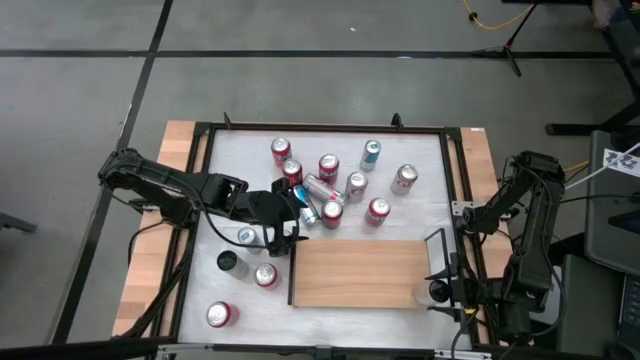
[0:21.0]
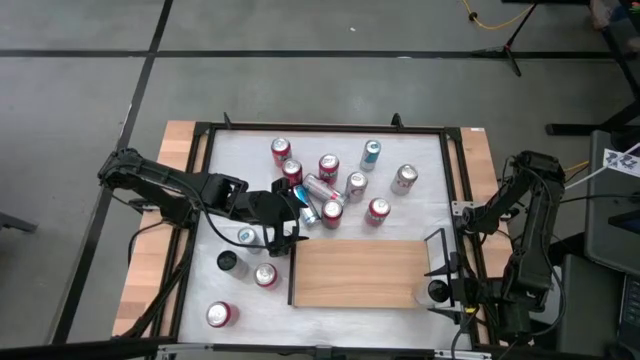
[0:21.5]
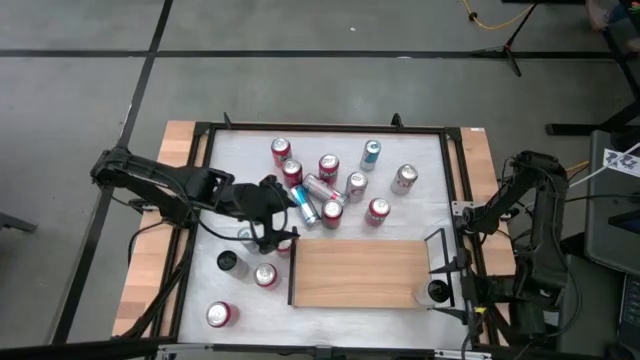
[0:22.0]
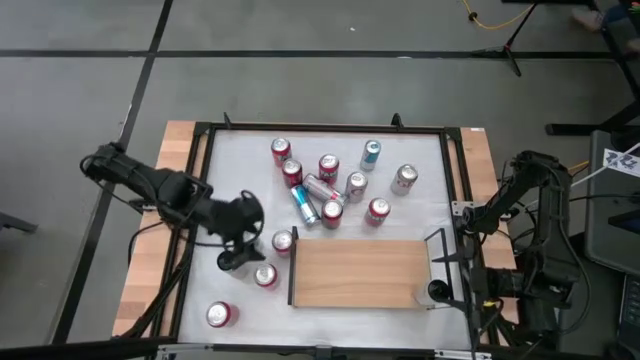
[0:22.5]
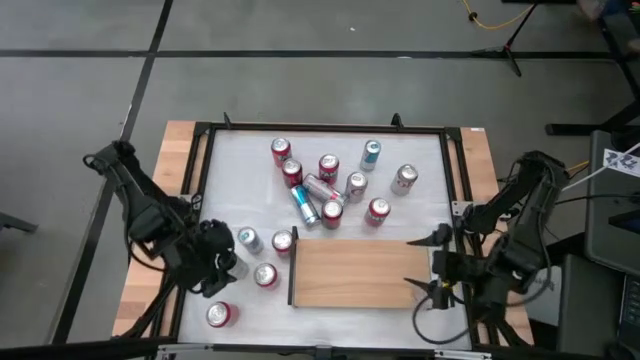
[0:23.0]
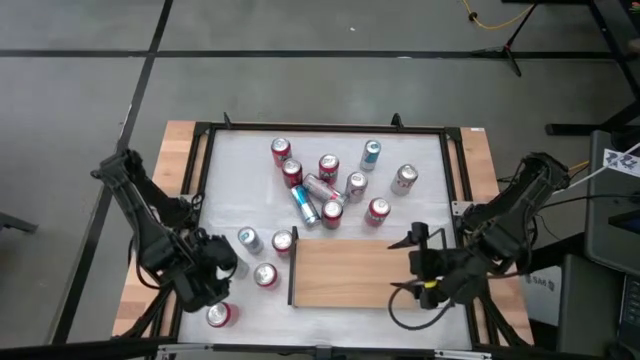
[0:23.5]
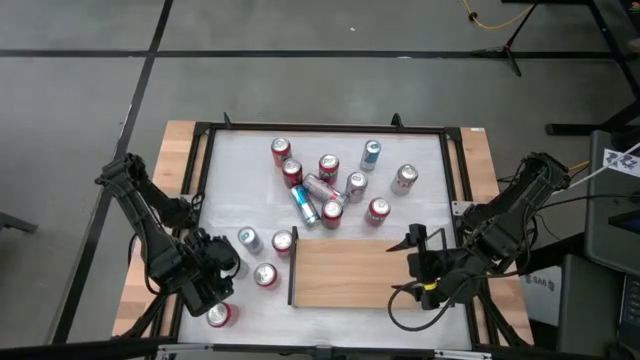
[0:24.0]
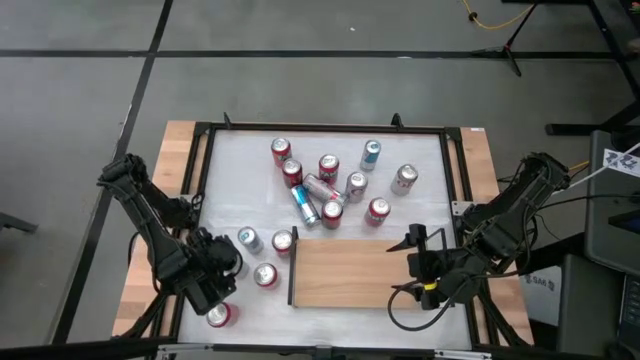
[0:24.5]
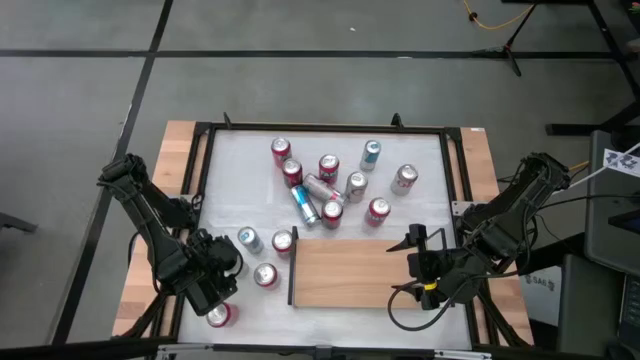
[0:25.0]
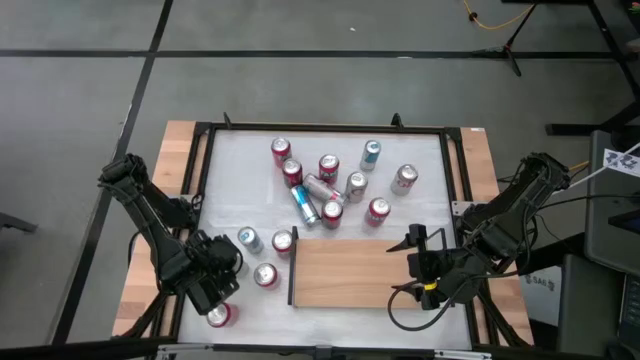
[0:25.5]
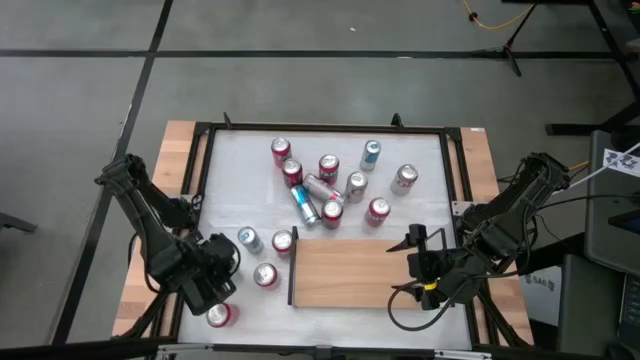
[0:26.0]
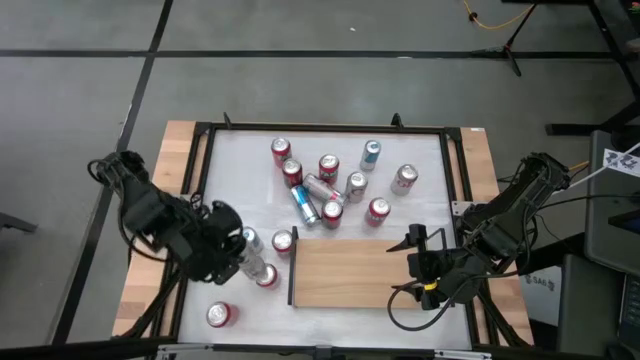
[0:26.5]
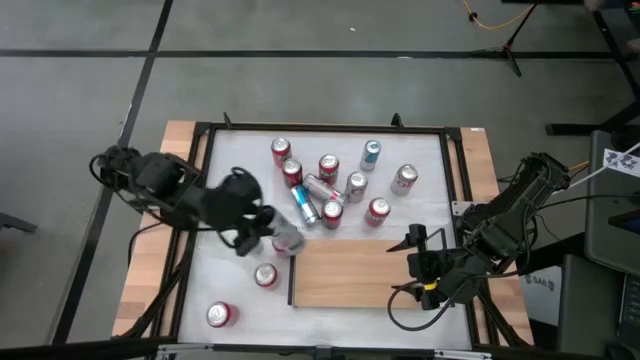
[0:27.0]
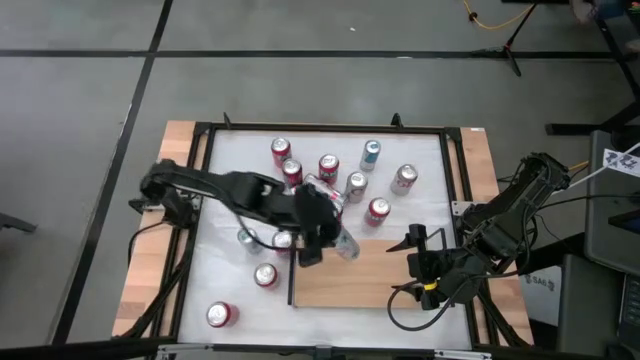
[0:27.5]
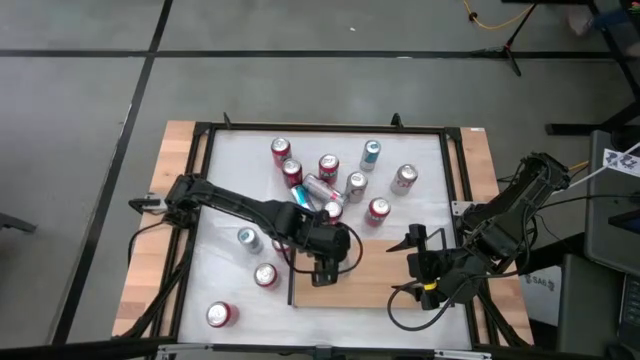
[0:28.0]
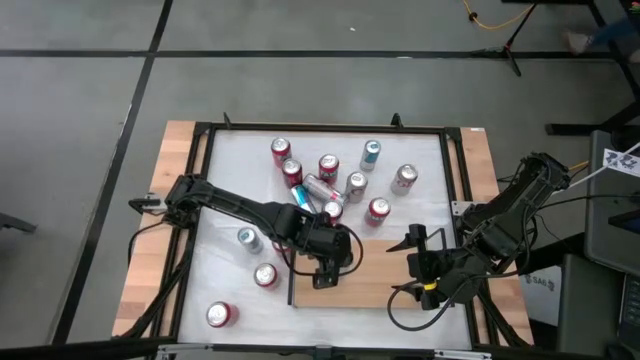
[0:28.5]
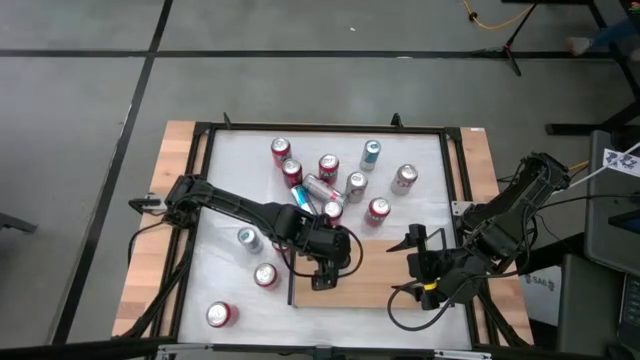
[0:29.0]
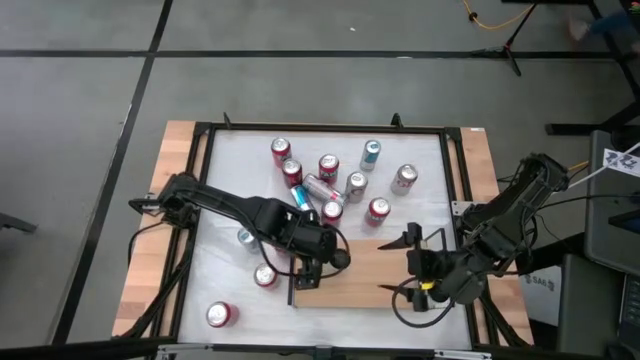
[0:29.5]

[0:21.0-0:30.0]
Task: Place canned beverage on shelf
Put the black soda can on the shelf

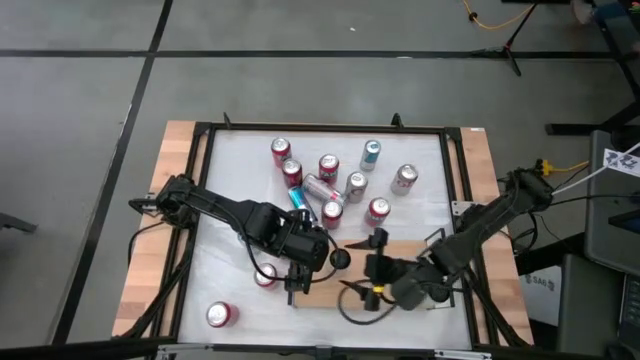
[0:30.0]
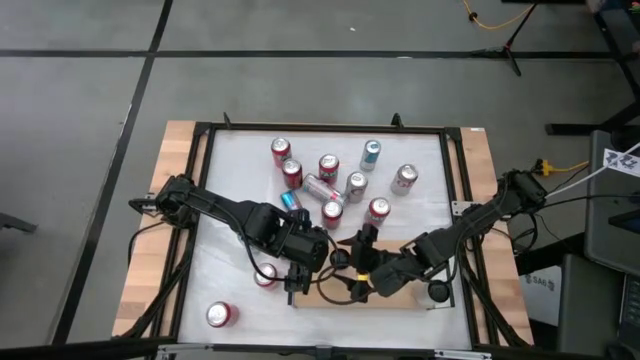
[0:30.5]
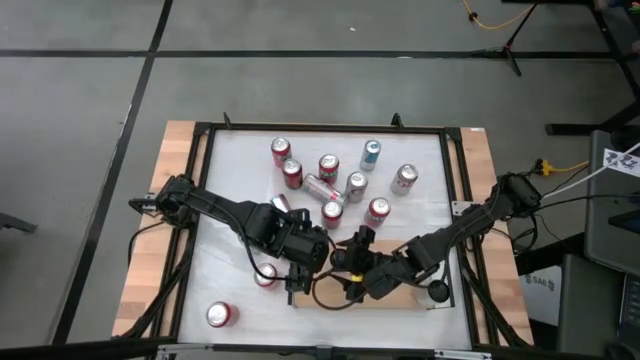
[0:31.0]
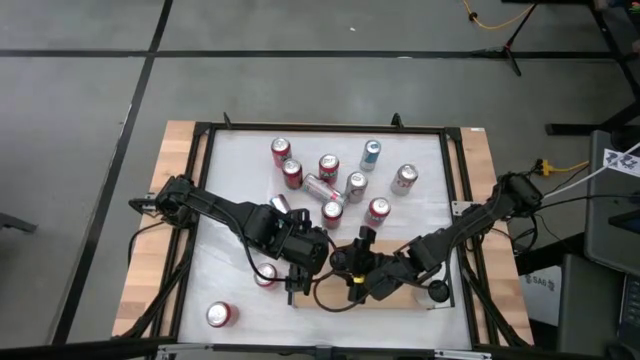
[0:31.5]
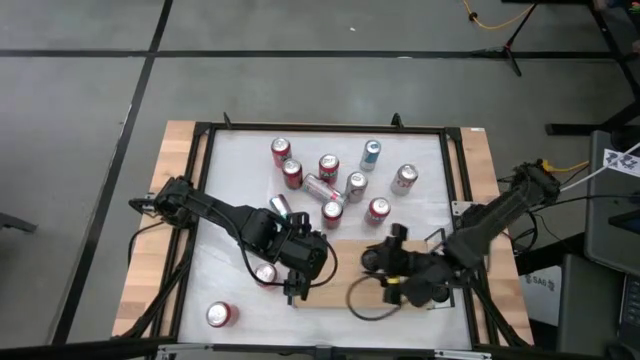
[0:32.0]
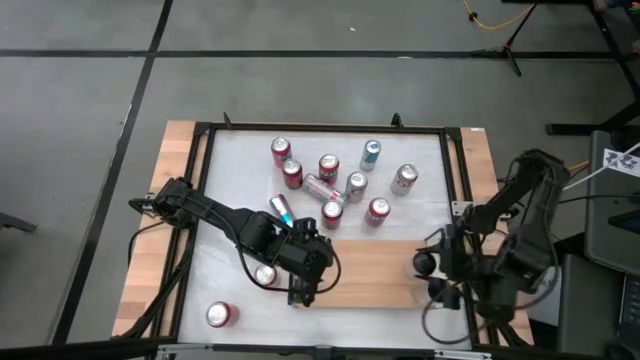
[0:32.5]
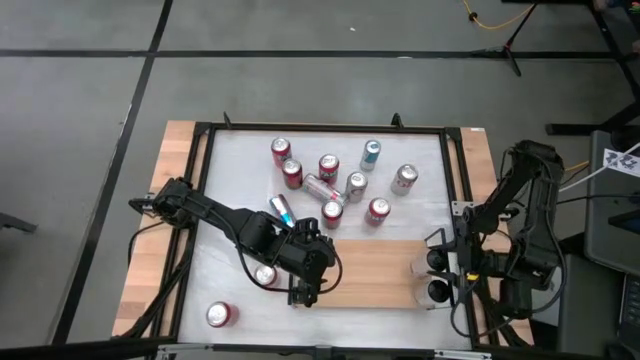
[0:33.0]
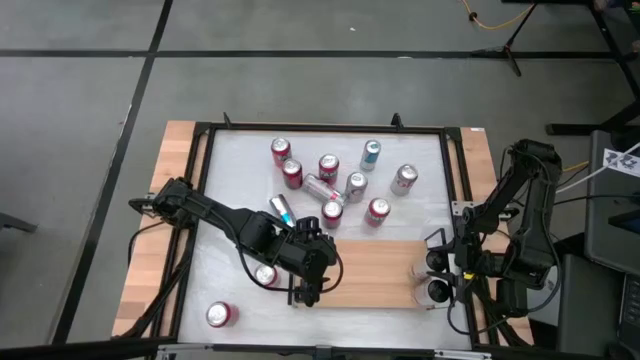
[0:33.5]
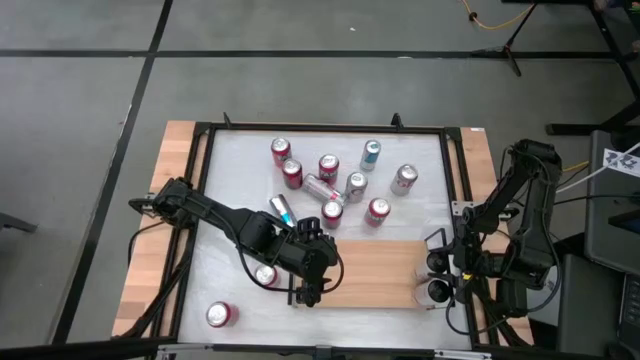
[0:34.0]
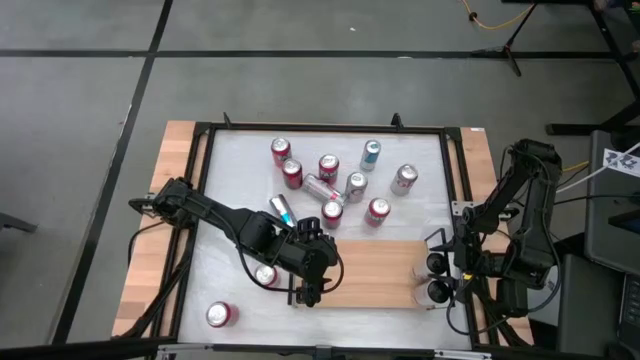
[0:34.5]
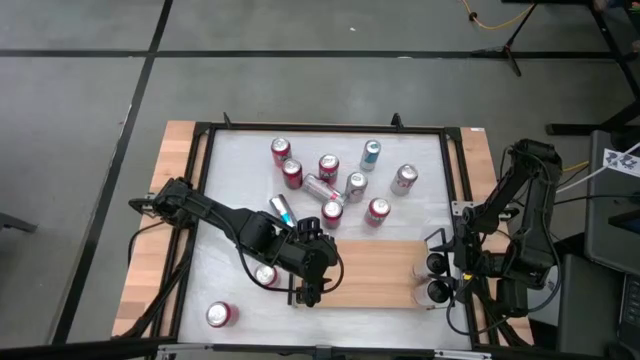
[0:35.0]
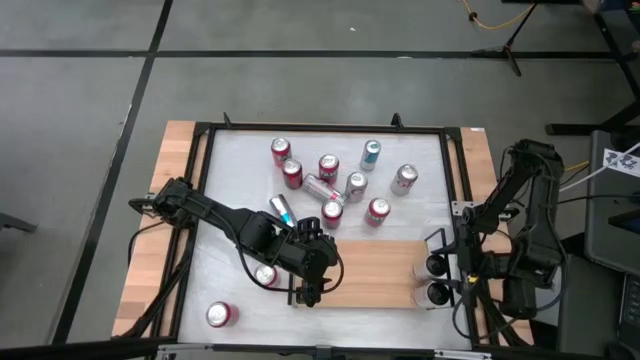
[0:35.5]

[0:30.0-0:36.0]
Move the black soda can on the shelf

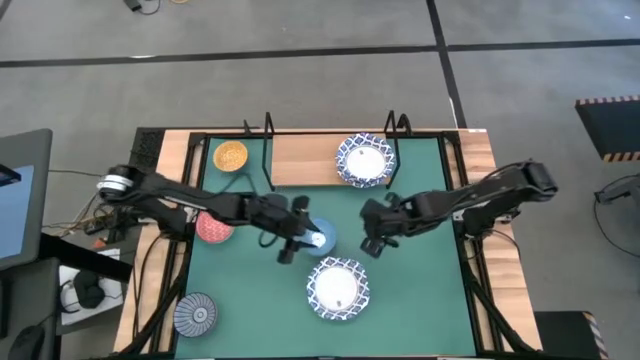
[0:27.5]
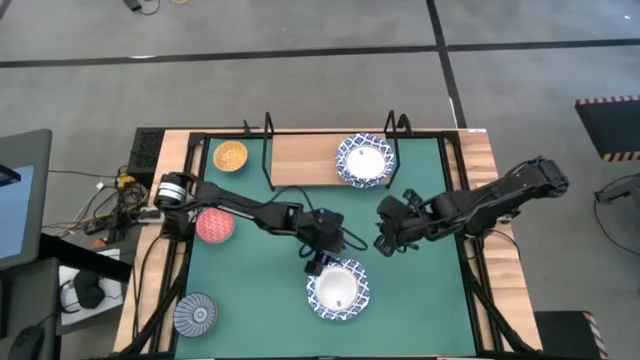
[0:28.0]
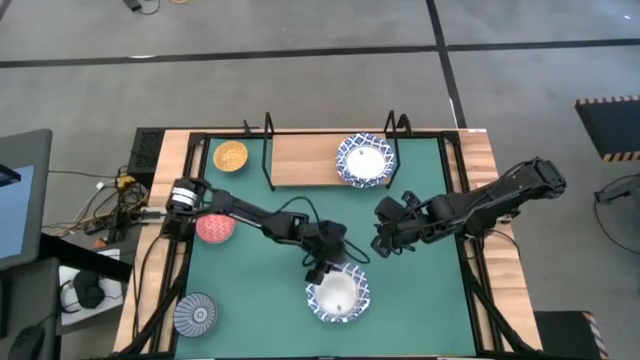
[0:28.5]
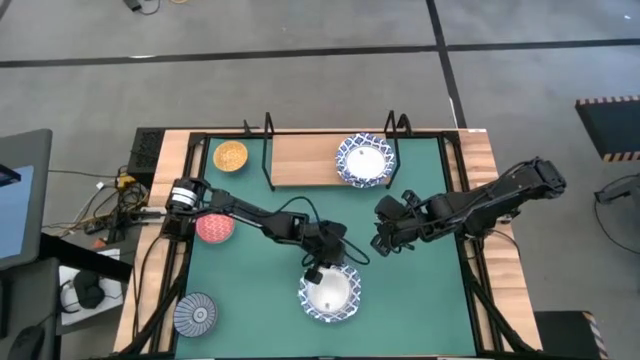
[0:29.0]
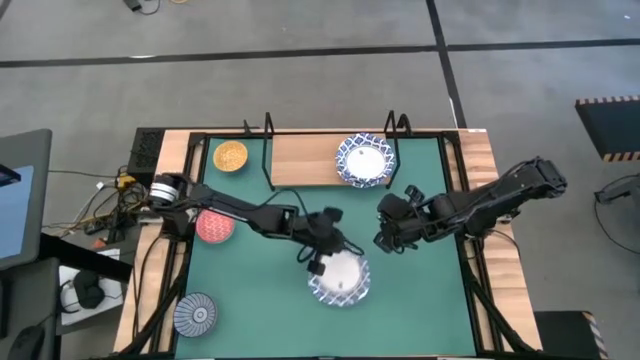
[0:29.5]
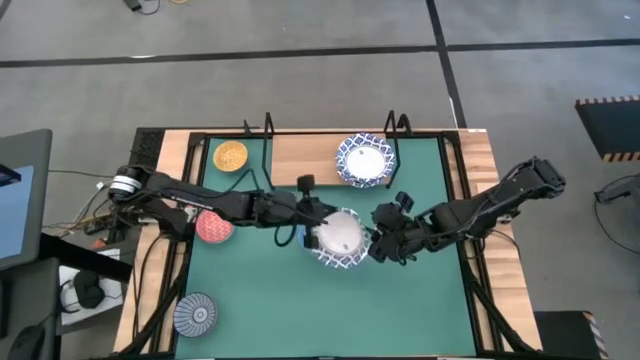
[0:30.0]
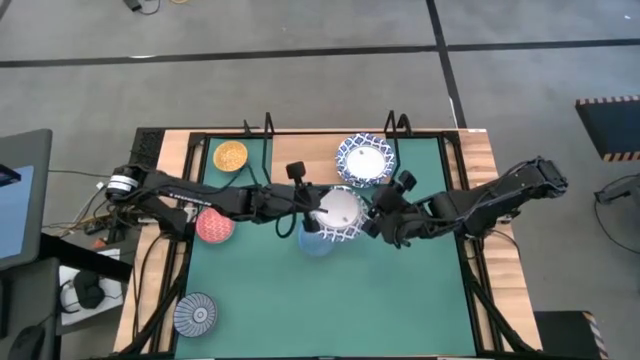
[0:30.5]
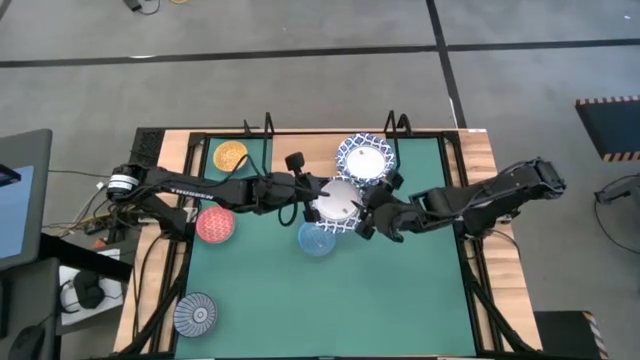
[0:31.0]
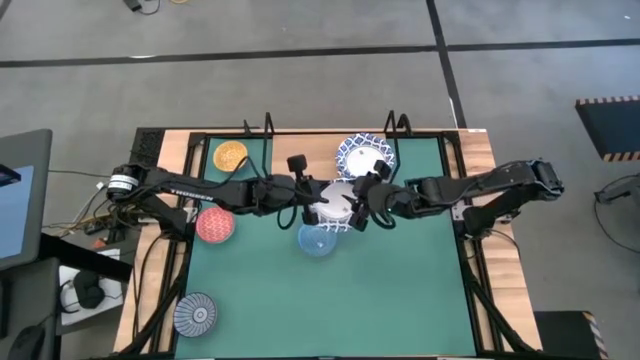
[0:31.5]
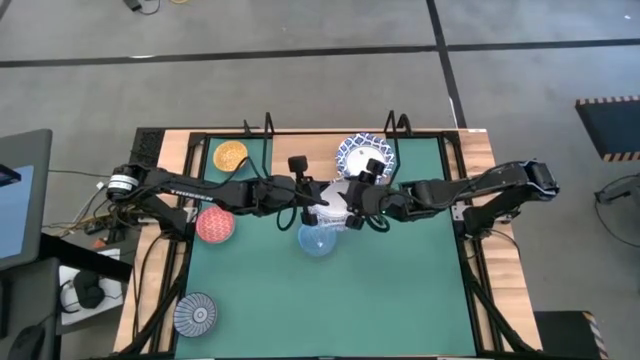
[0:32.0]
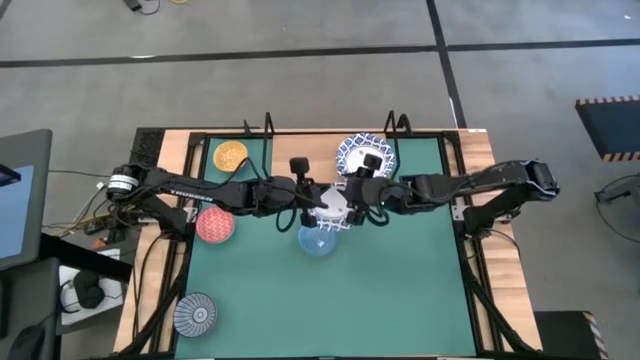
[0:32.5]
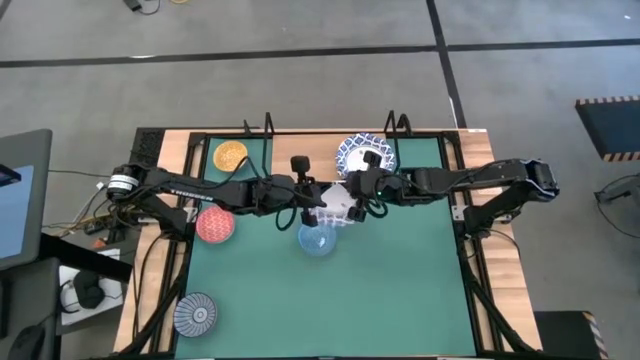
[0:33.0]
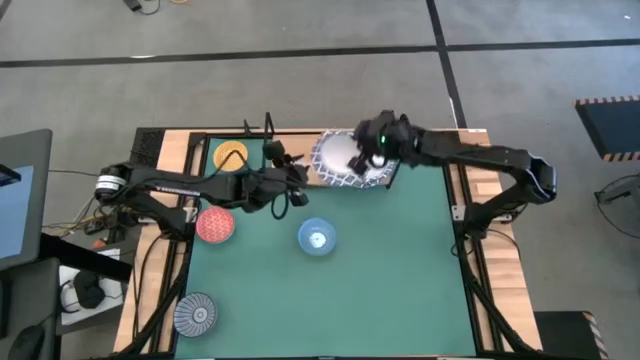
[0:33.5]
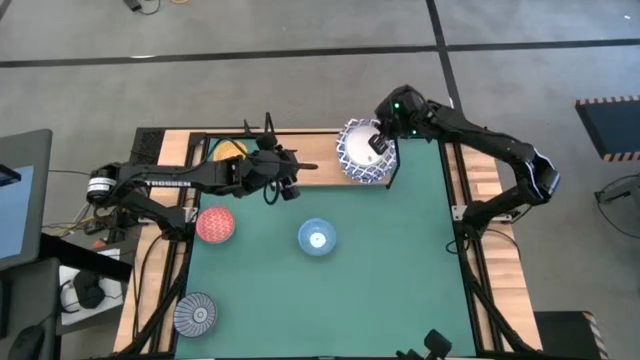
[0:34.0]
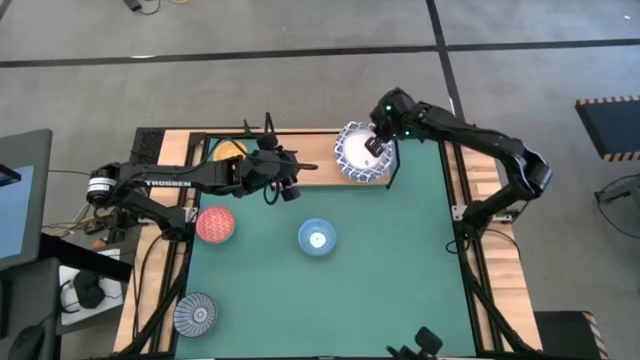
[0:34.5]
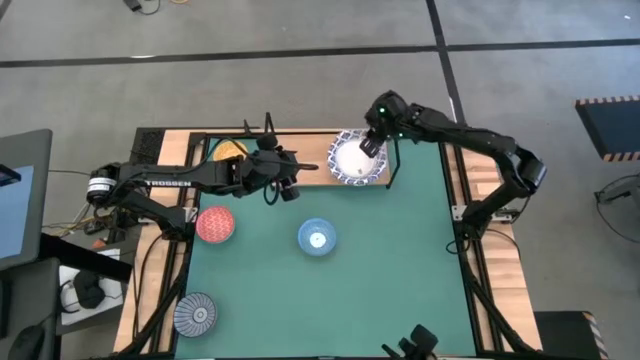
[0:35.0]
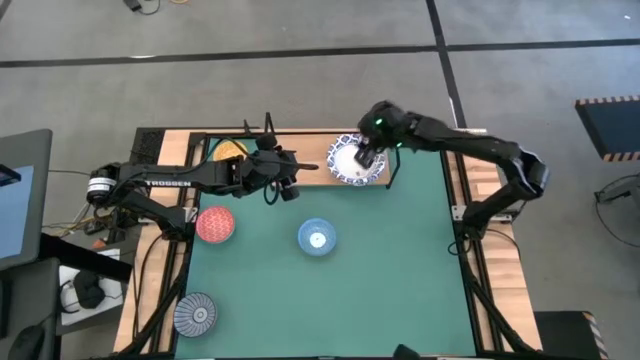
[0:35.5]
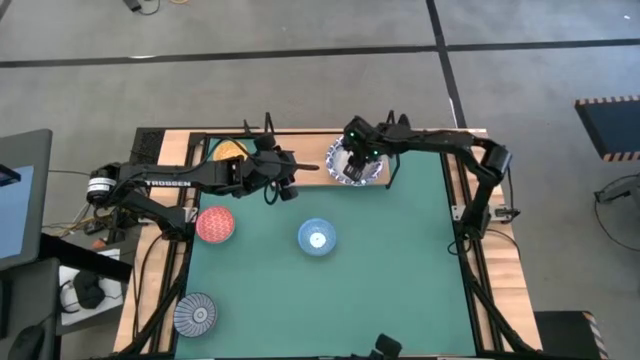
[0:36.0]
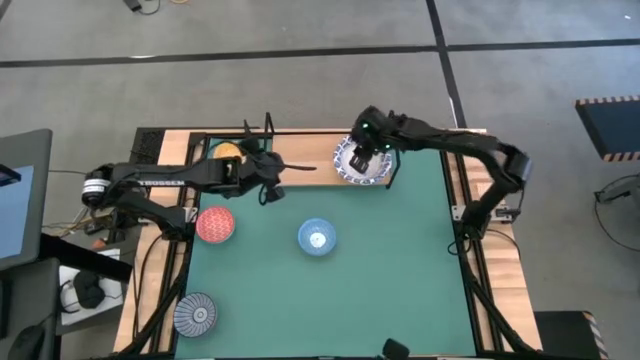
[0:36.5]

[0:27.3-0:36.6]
Task: Place and stack bowls onto a shelf
Stack the white patterned bowl on top of the white patterned bowl on the shelf
